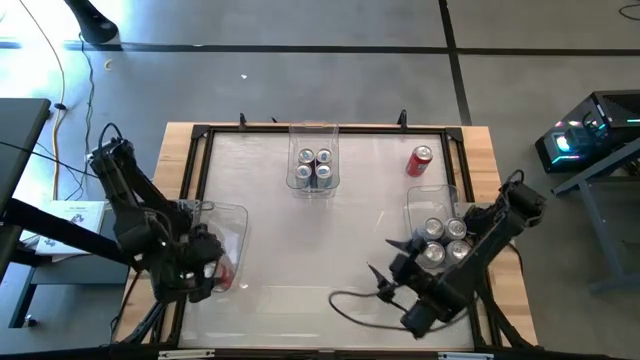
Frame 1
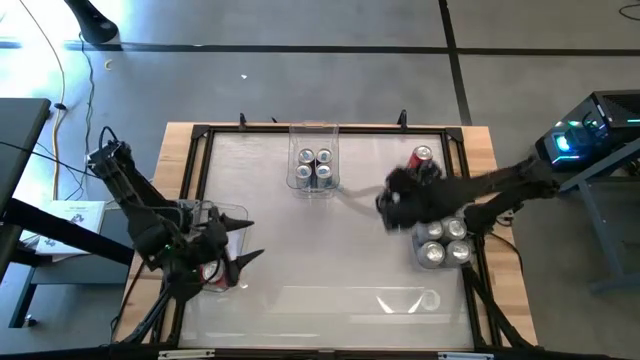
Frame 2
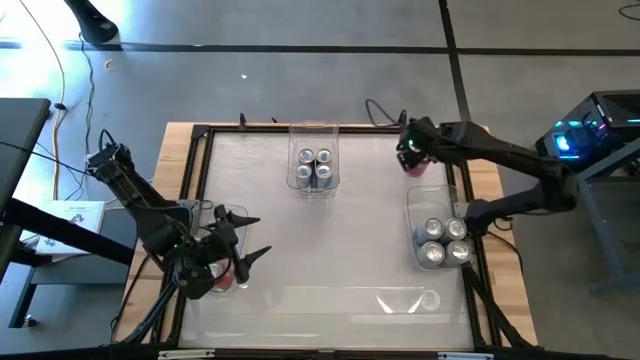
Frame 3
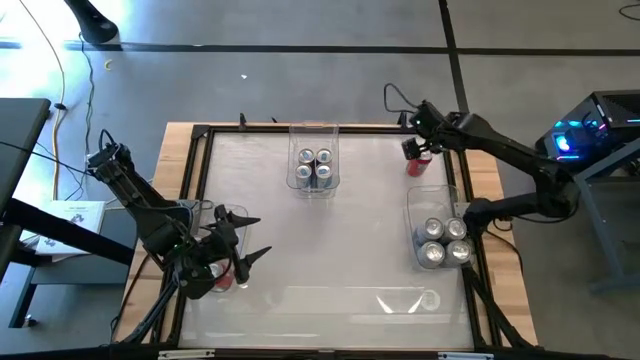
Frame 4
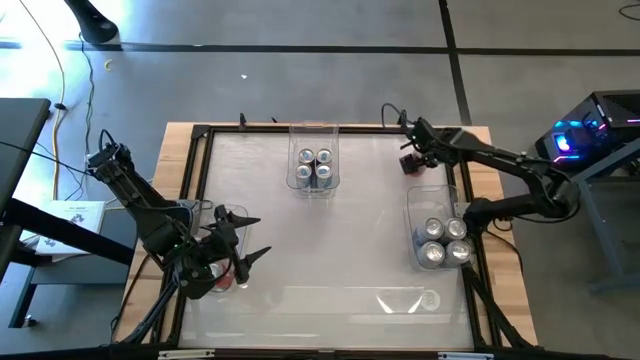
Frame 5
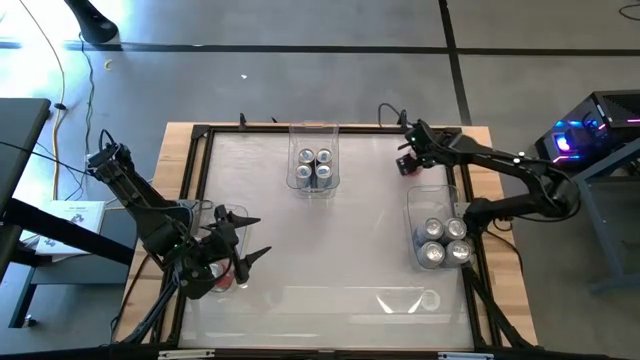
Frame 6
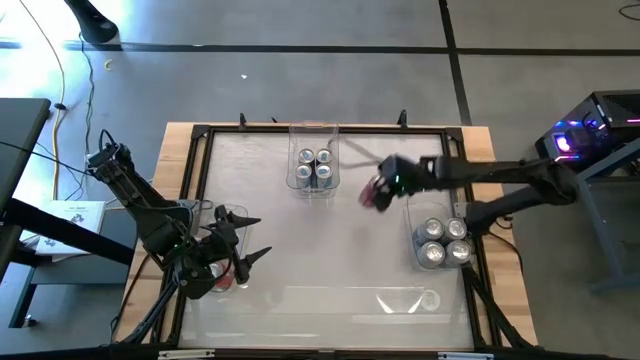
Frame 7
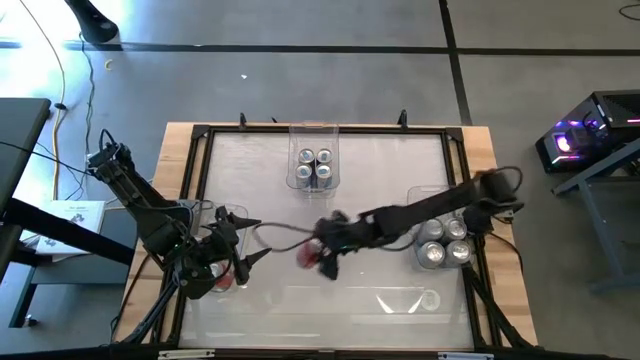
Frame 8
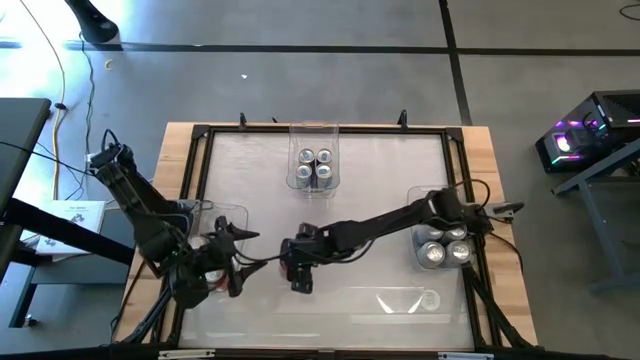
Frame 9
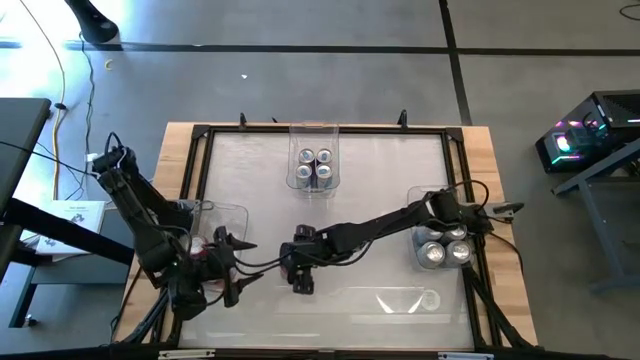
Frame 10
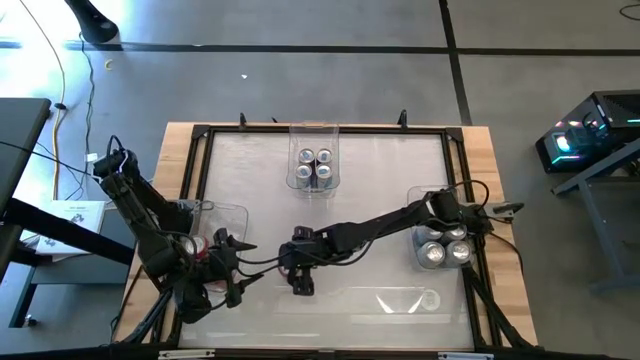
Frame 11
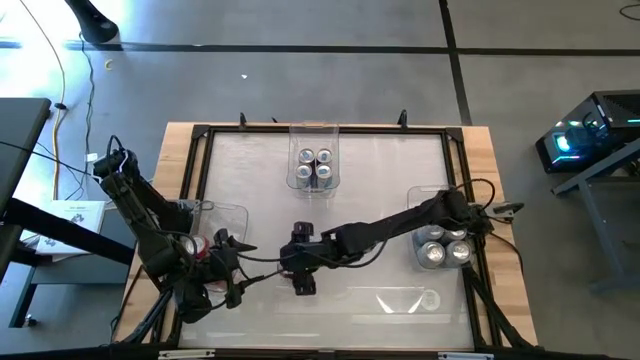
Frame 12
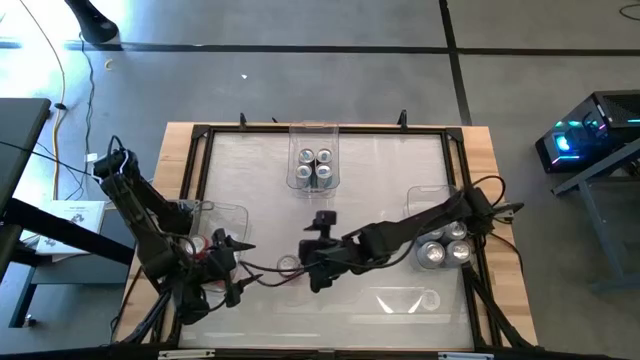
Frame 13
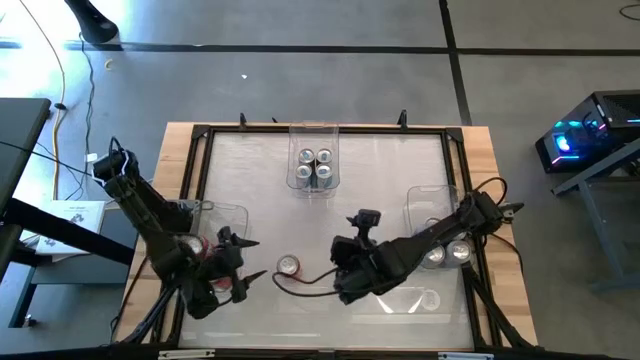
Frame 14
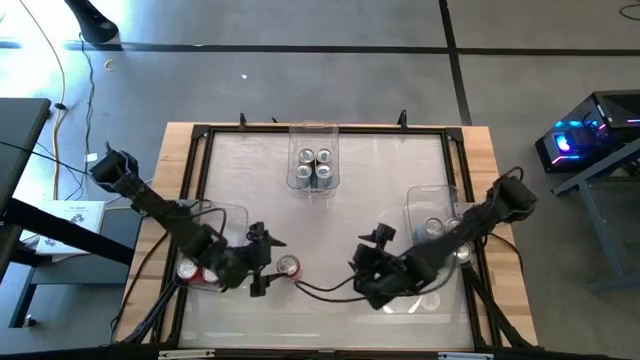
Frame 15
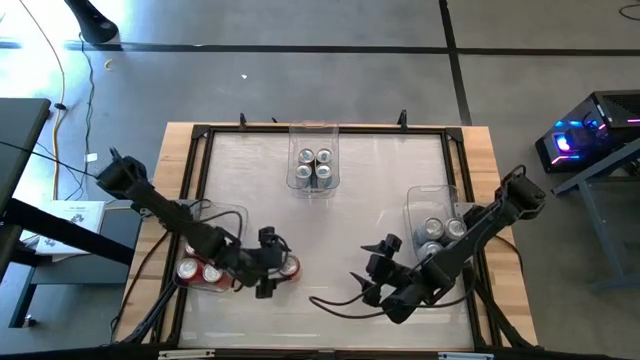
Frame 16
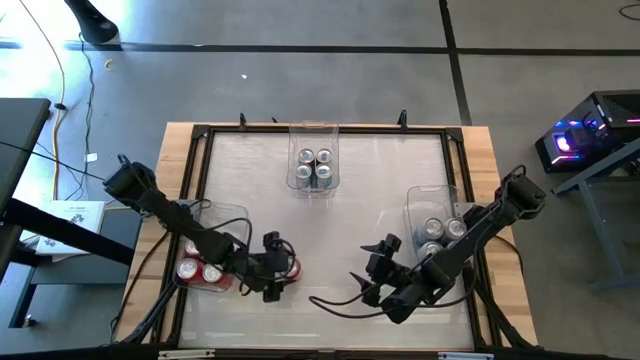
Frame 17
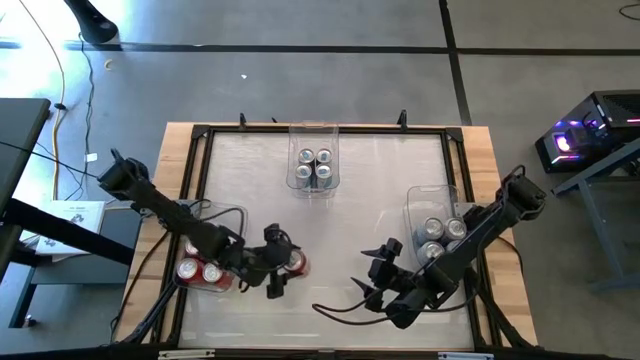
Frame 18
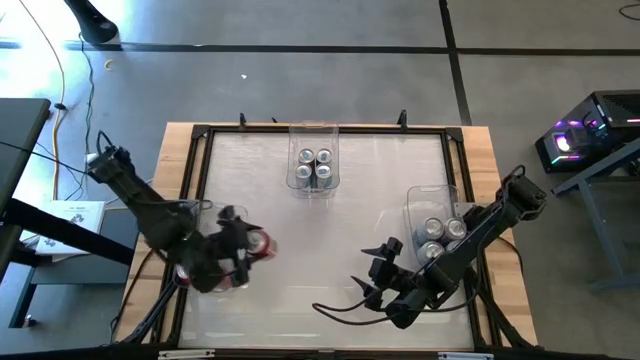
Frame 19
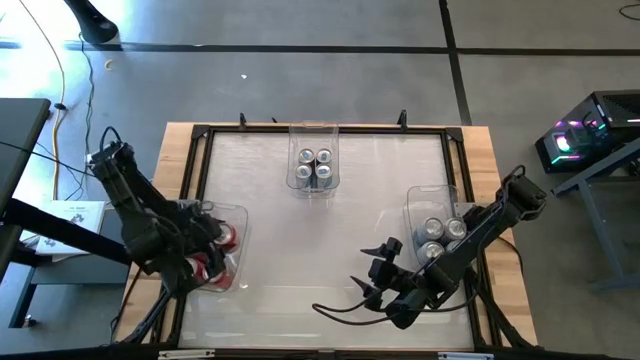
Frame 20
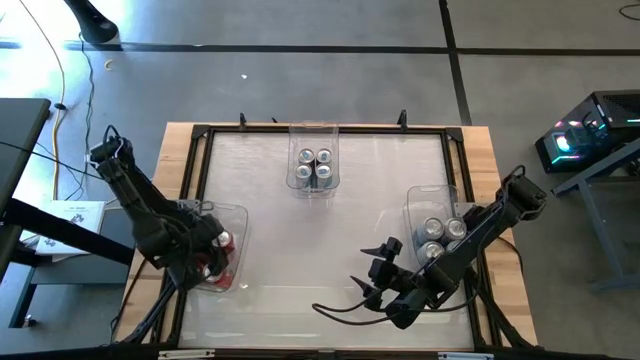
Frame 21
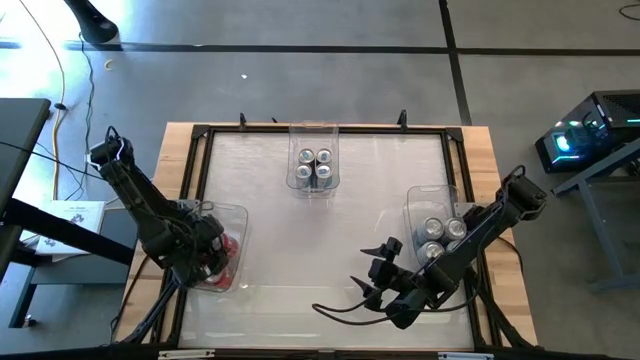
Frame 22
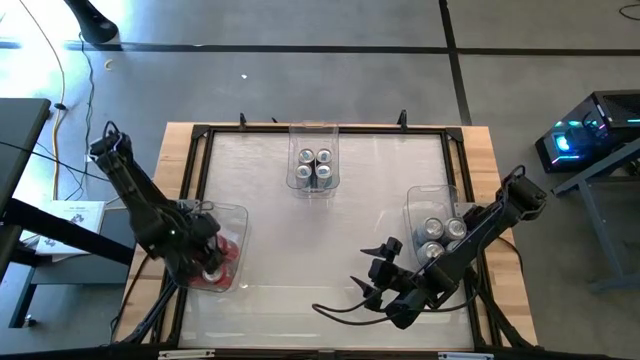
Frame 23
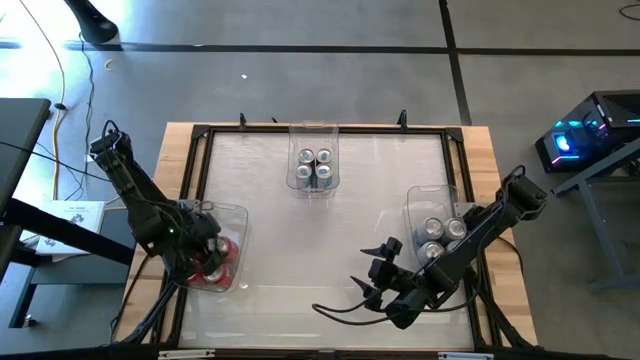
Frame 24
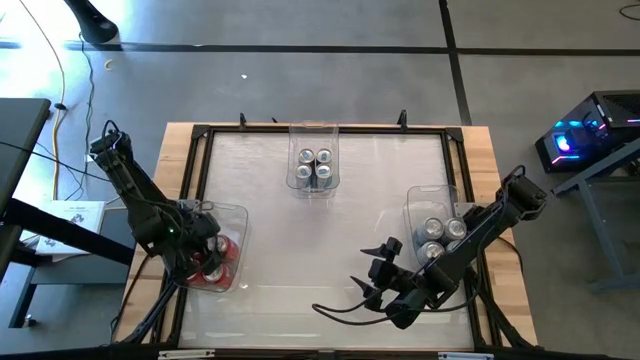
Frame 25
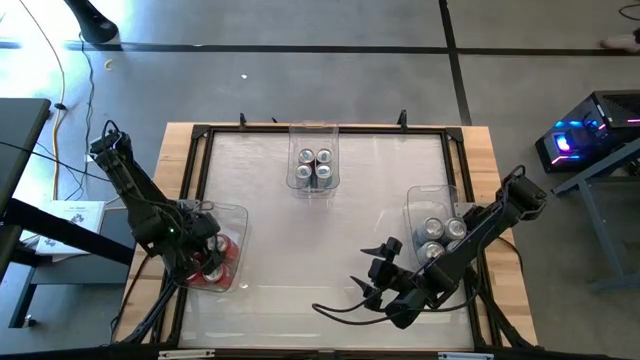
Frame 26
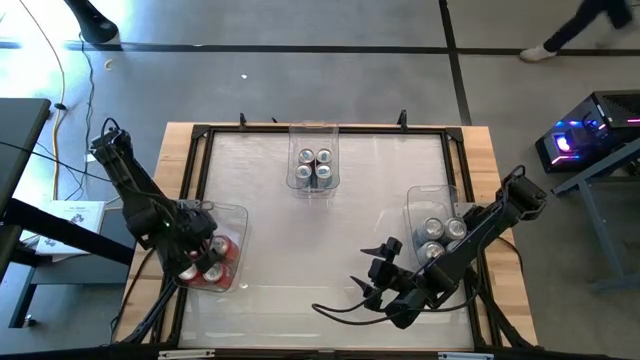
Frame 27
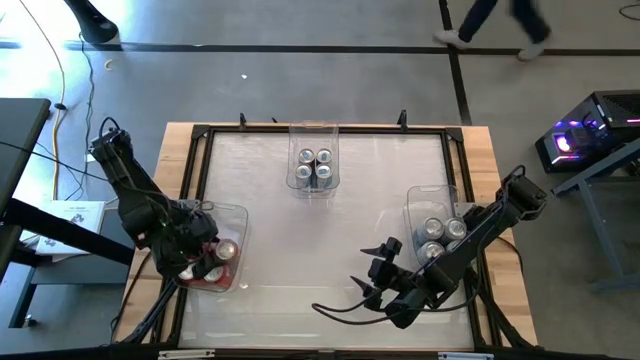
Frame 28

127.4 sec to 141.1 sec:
Task: Sort soda cans
Put the orange soda can into bottom left center transparent bin

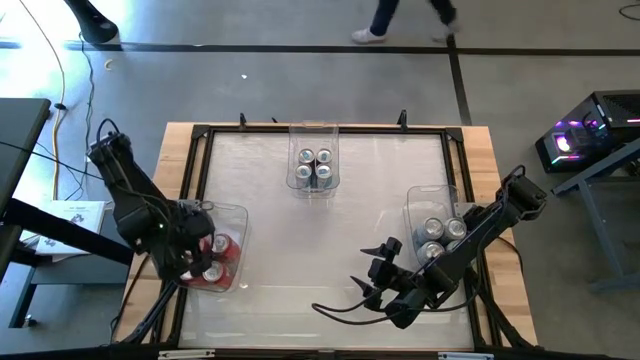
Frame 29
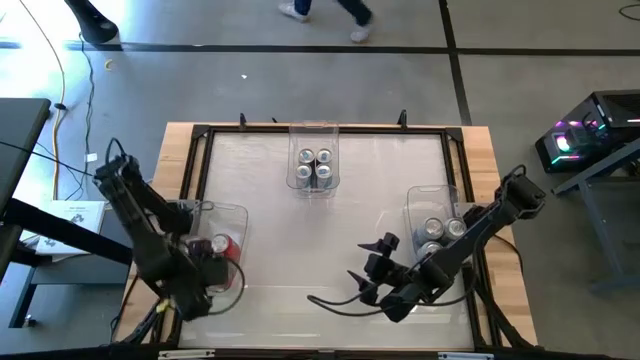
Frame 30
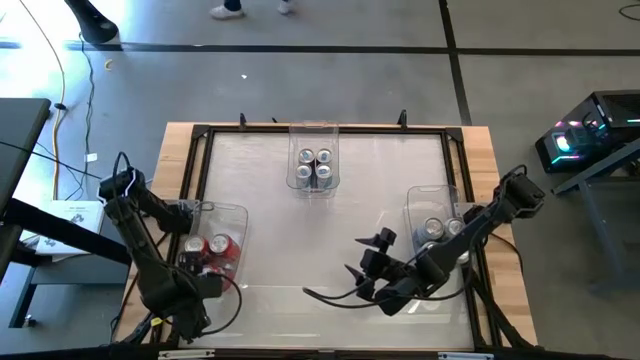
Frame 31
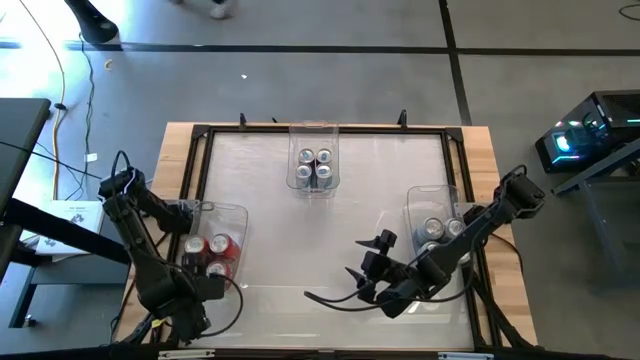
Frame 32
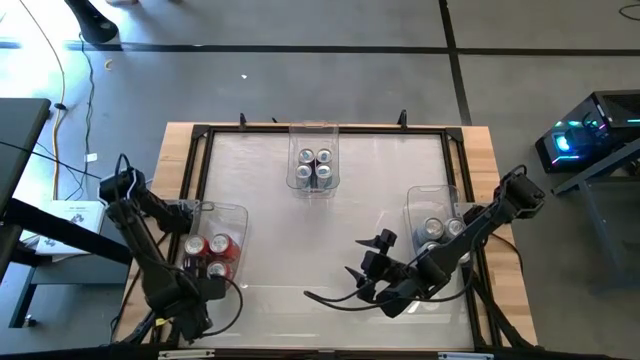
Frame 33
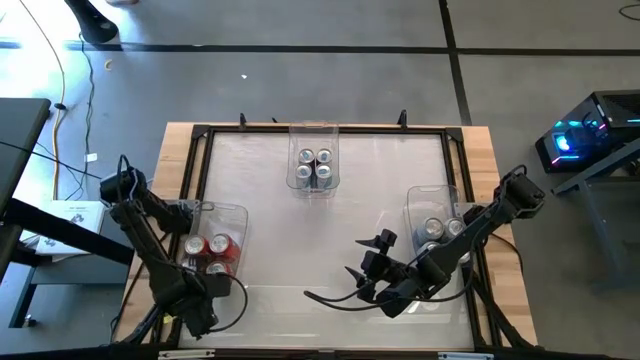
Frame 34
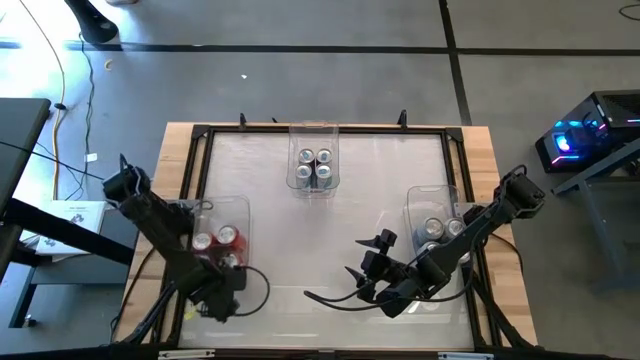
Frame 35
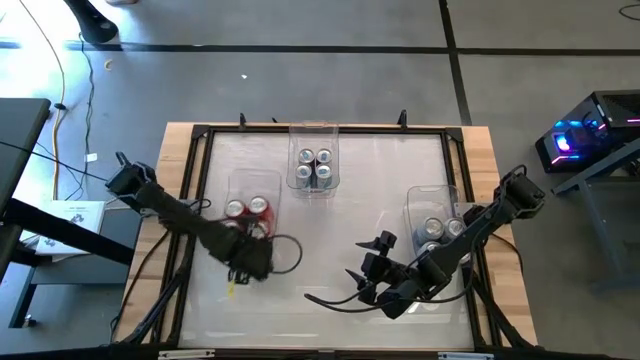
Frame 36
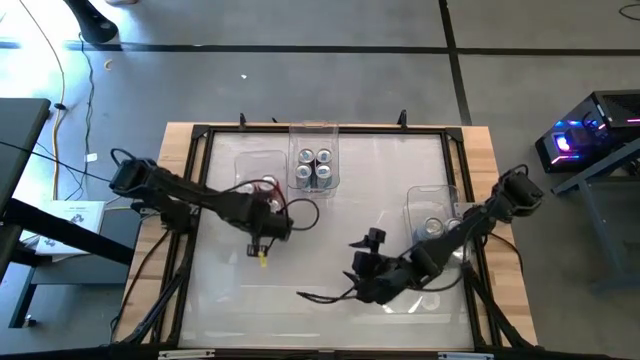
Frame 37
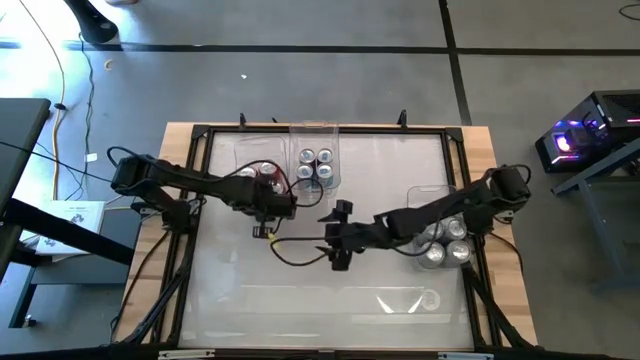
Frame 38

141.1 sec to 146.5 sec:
Move the bottom left transparent bin to the top

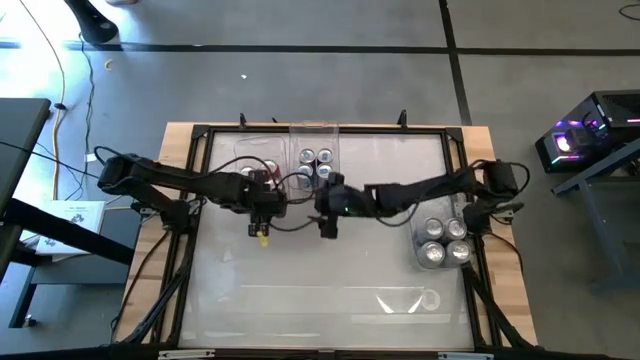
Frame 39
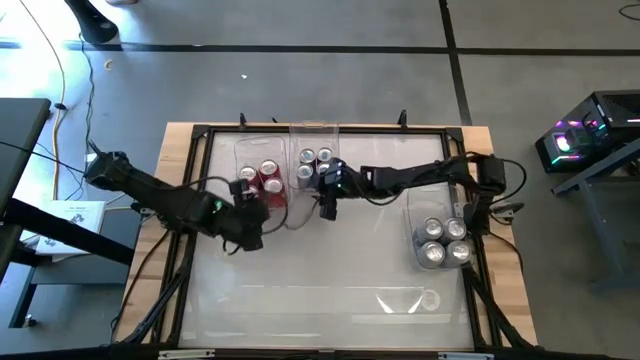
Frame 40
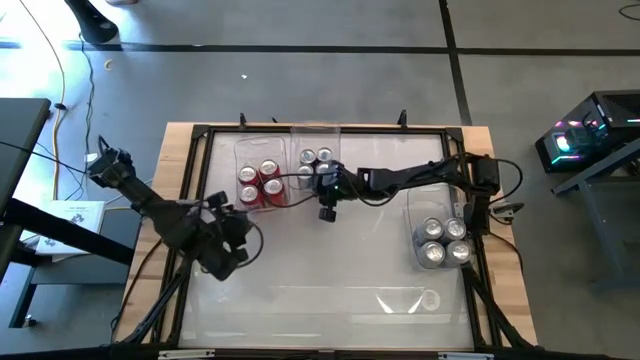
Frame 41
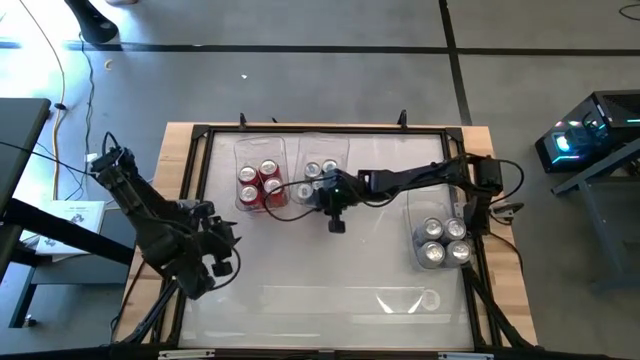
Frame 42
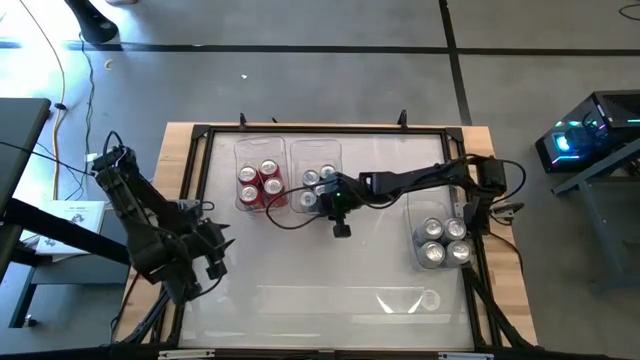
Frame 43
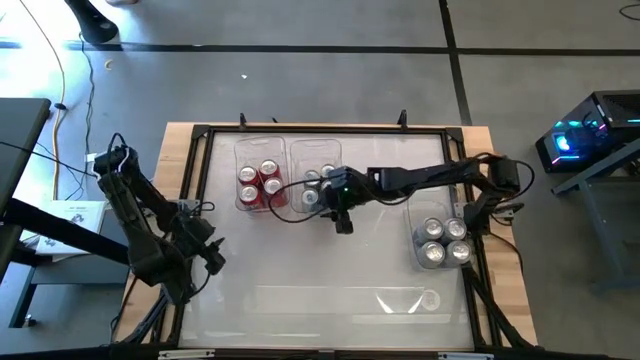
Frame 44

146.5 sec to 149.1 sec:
Adjust the top center transparent bin

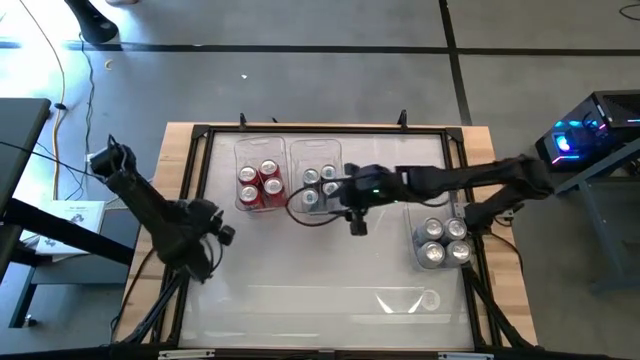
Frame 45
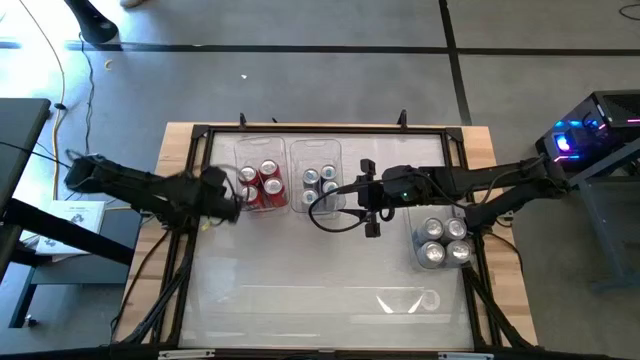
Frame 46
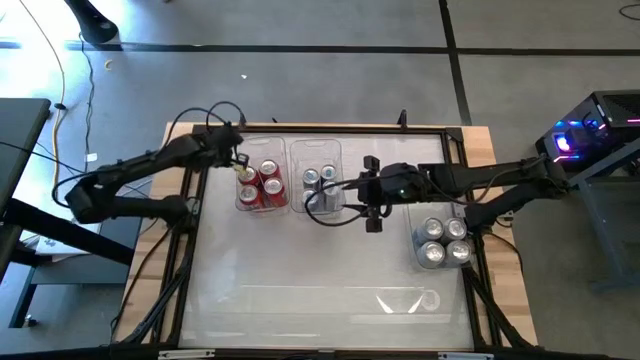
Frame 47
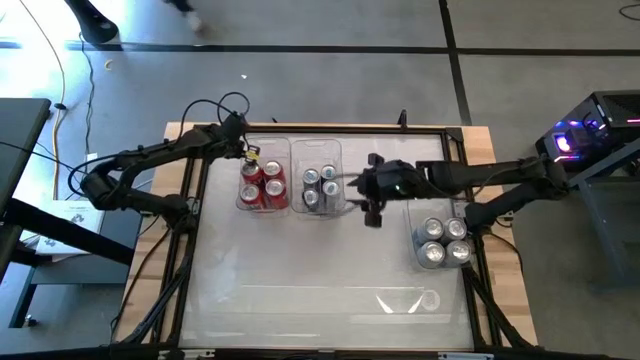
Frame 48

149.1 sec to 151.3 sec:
Adjust the top left transparent bin
